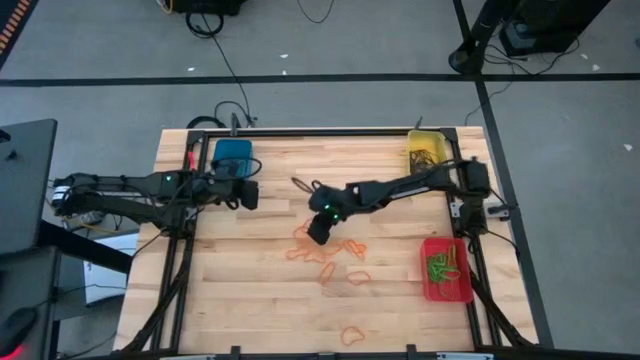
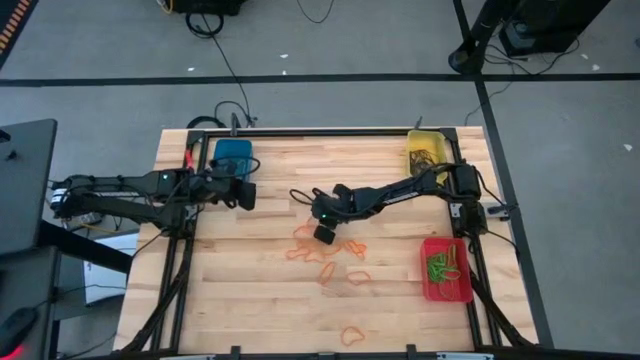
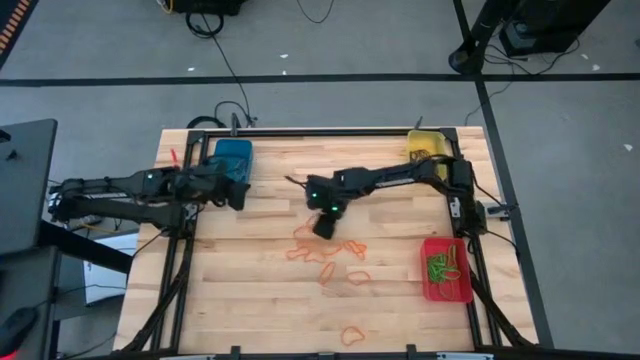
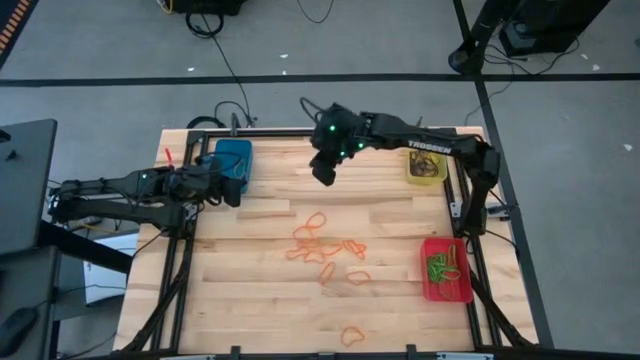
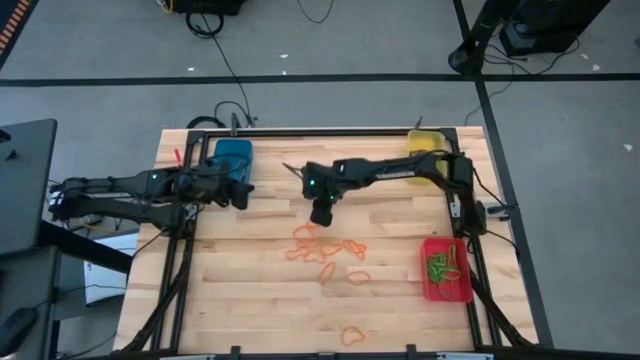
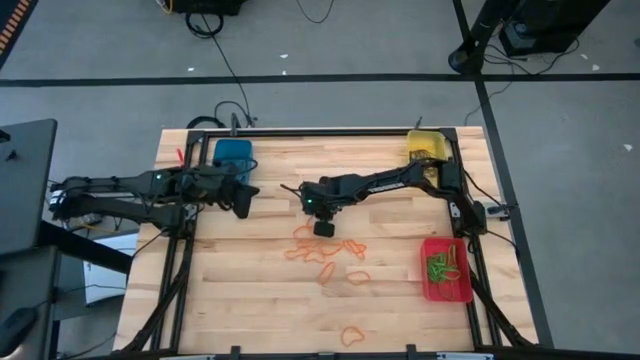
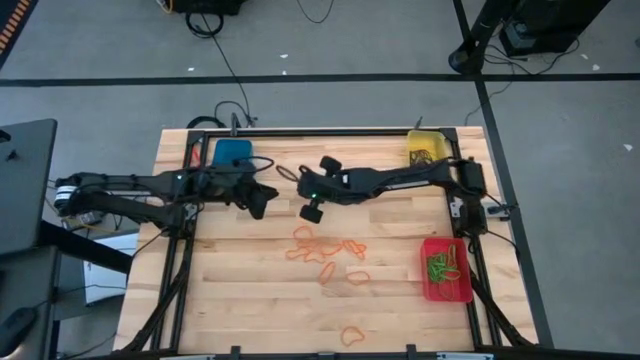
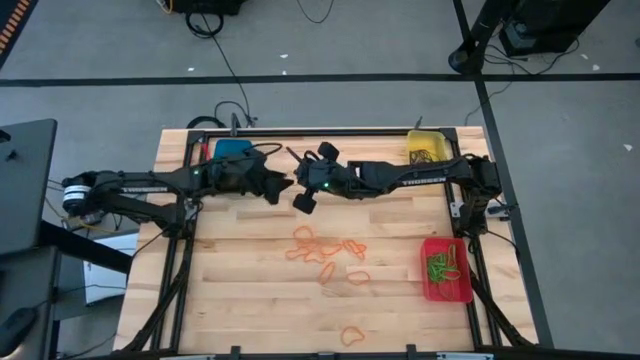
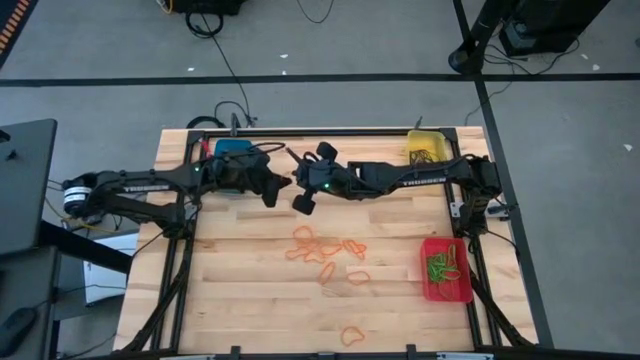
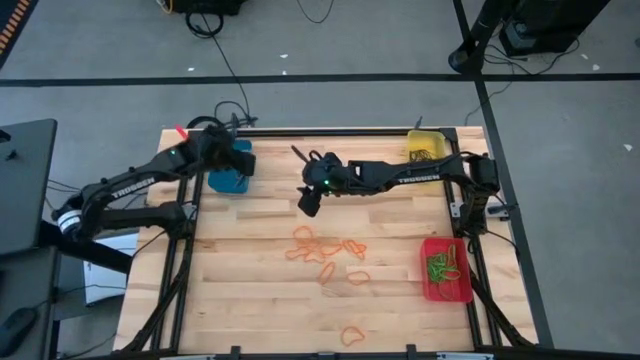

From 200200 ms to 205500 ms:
Task: Sort rubber bands into baskets
Put the orange rubber band into the blue bin

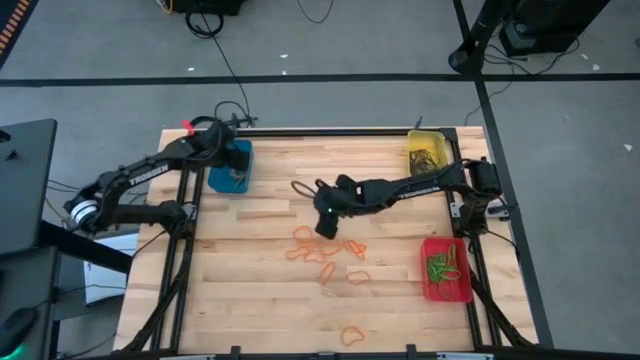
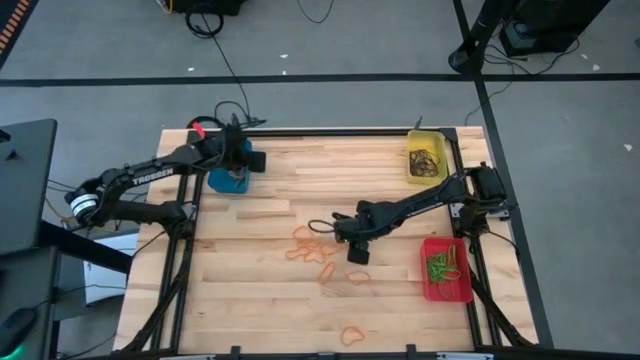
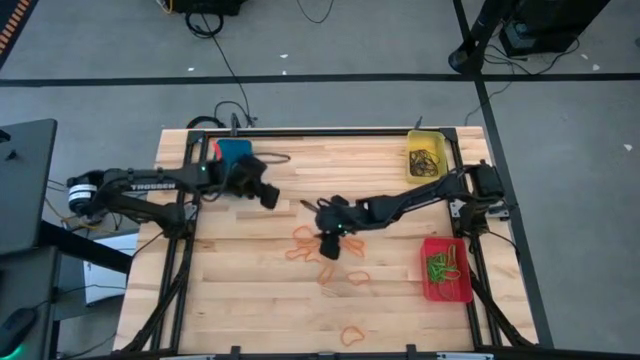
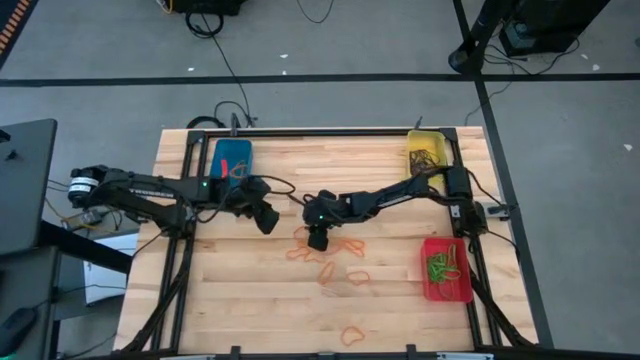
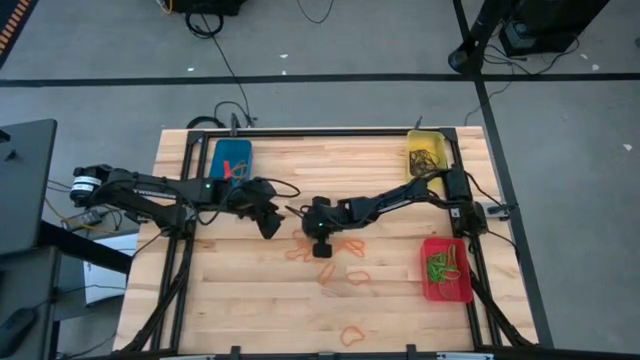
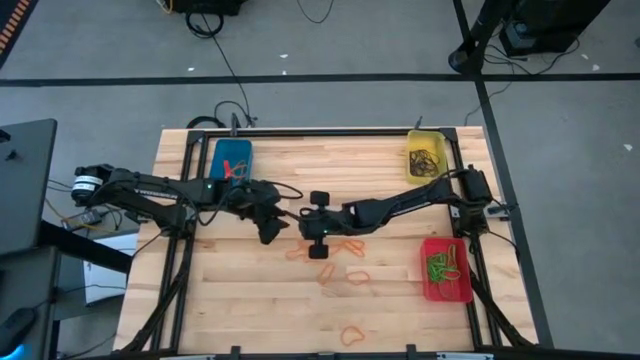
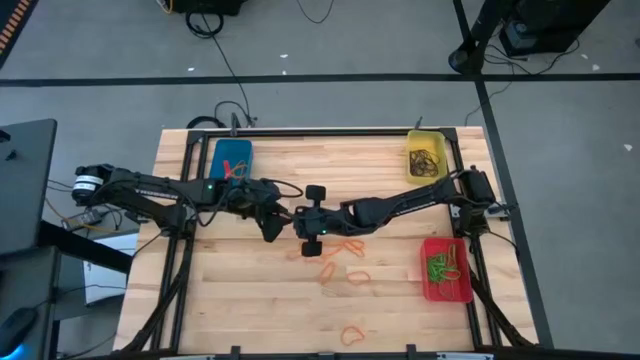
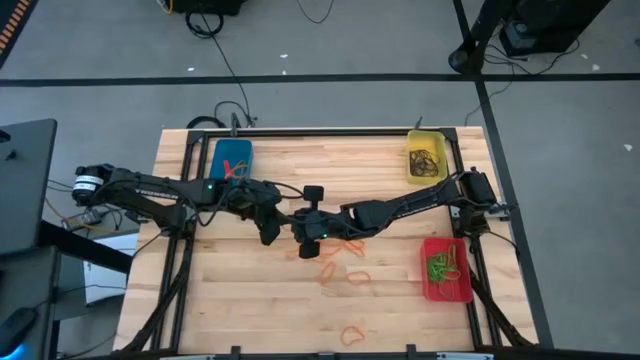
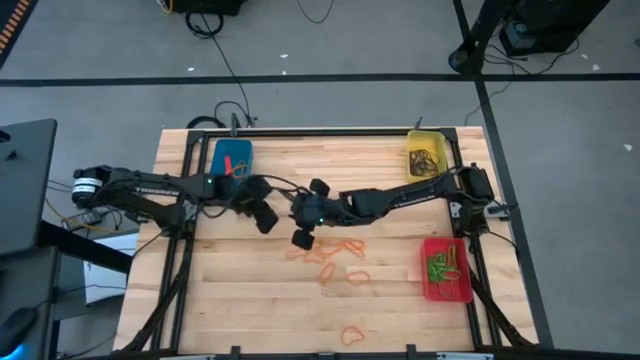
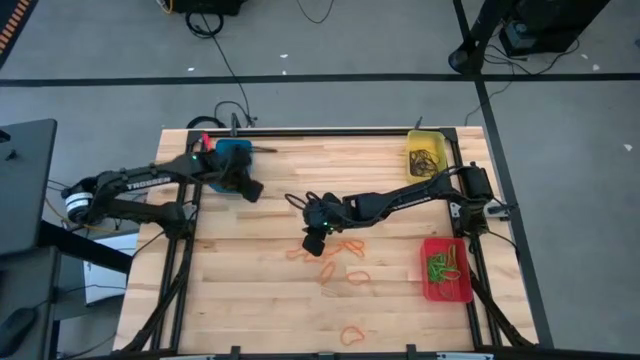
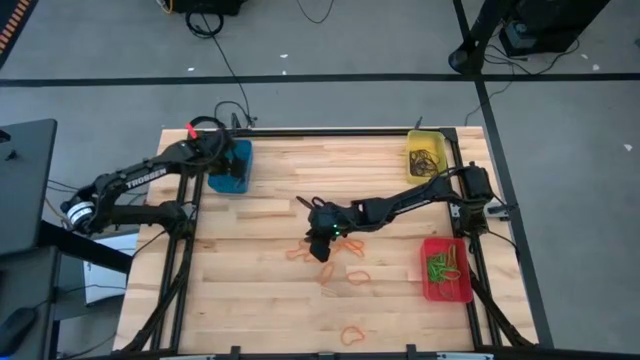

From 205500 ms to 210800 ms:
Put the orange rubber band into the blue bin

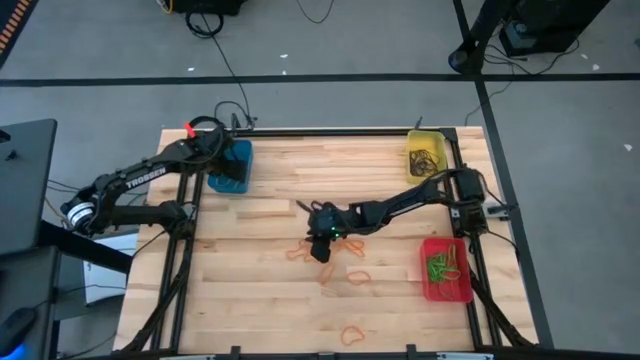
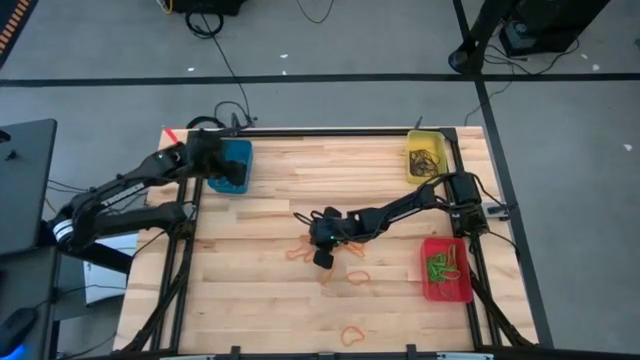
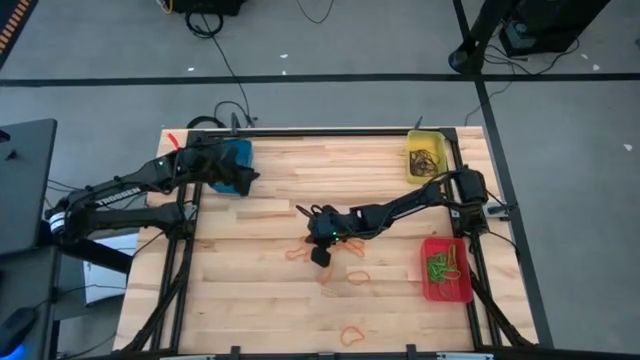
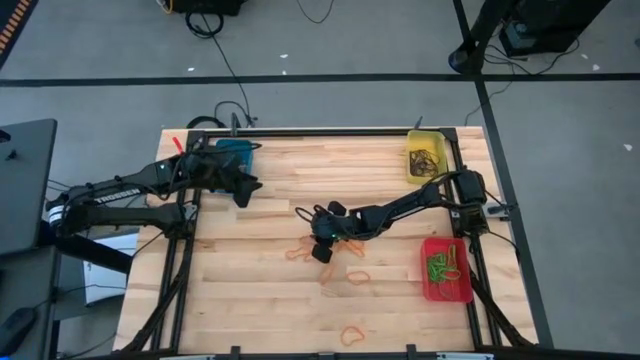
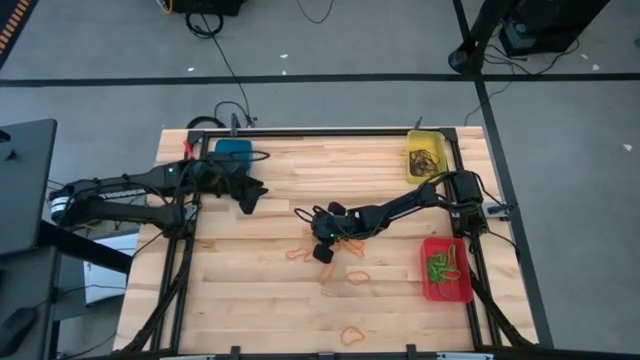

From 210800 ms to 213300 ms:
Put the orange rubber band into the blue bin

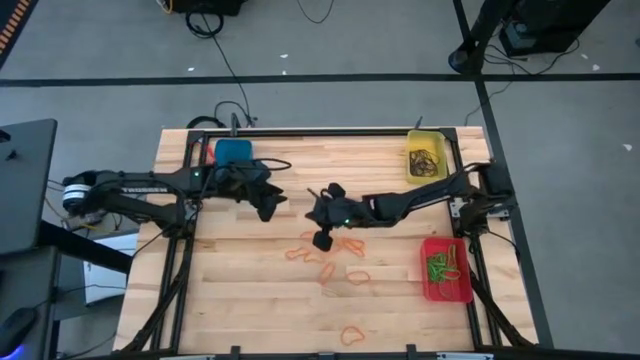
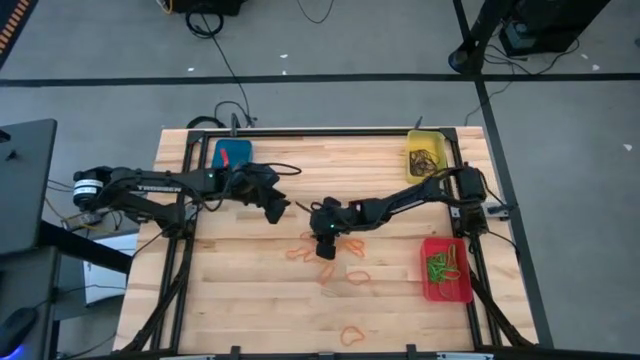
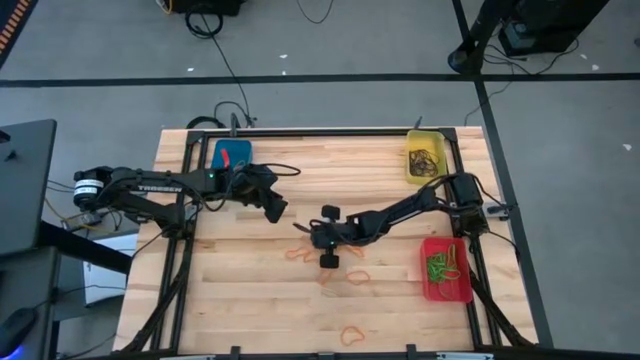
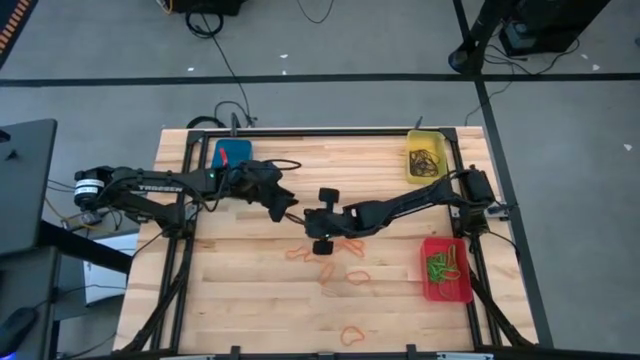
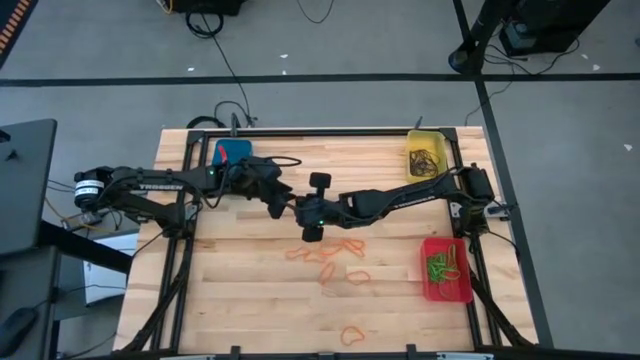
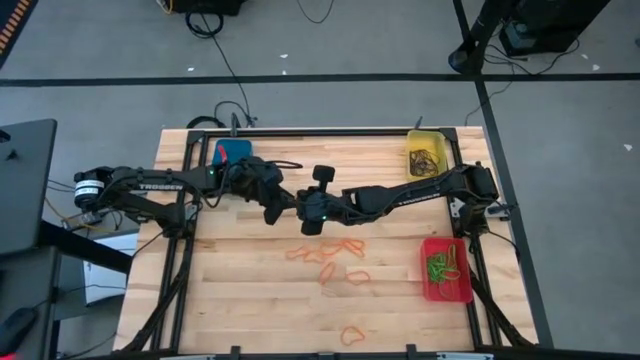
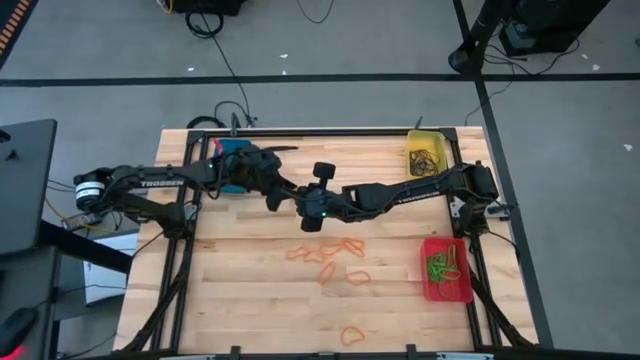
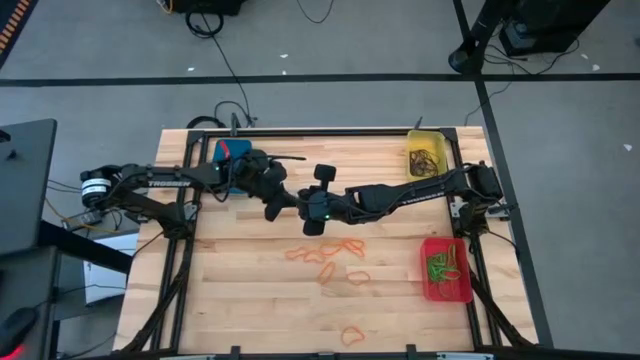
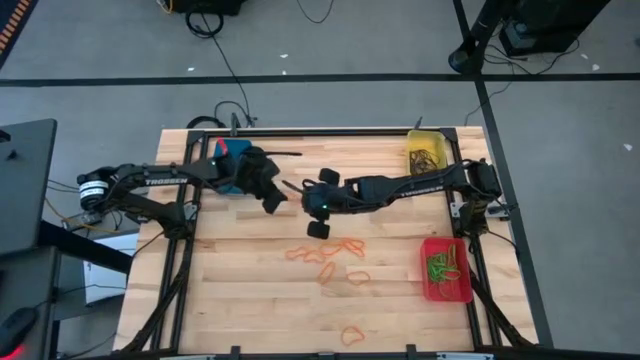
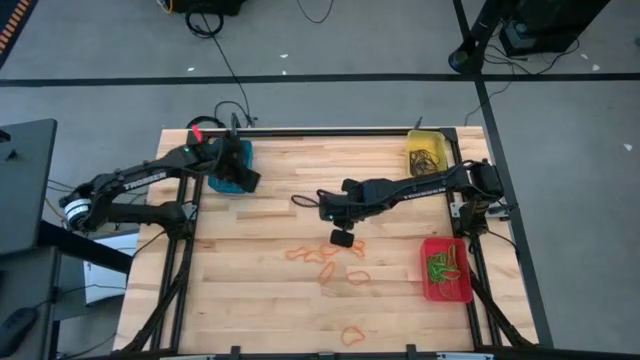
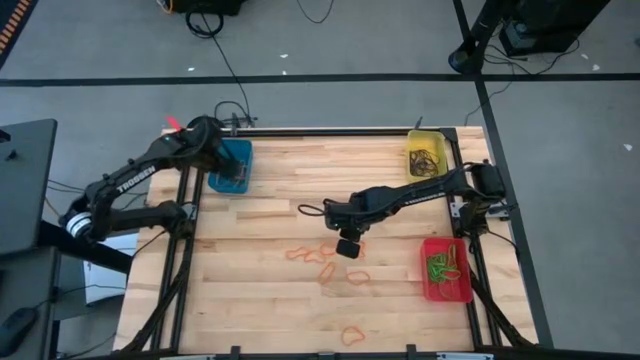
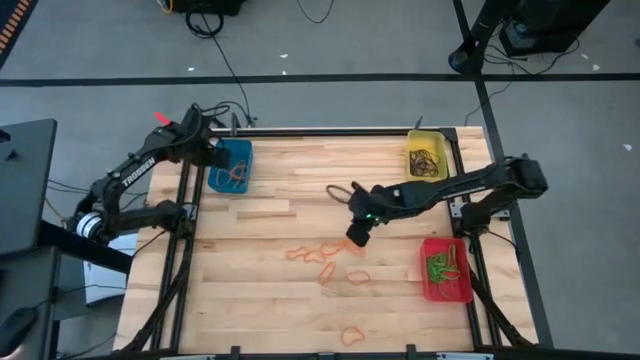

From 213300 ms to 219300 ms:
Put the orange rubber band into the blue bin

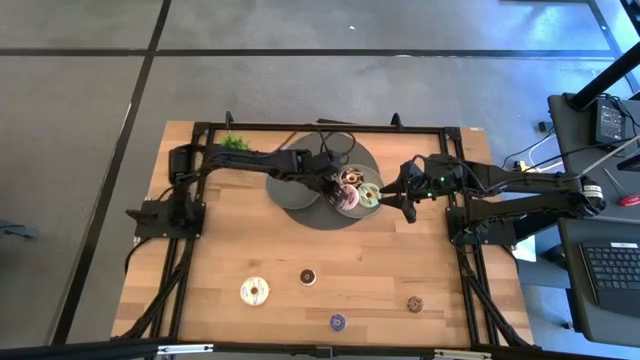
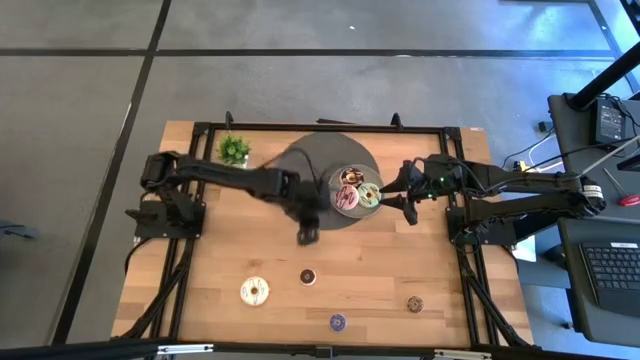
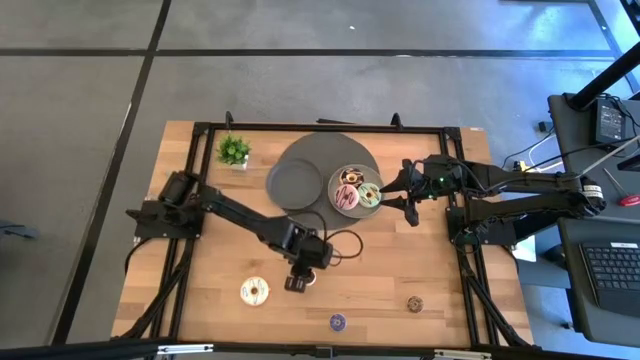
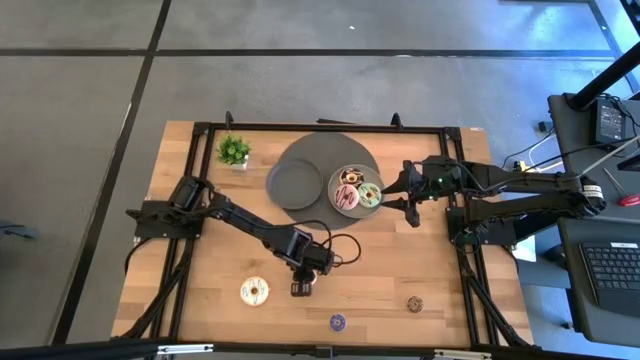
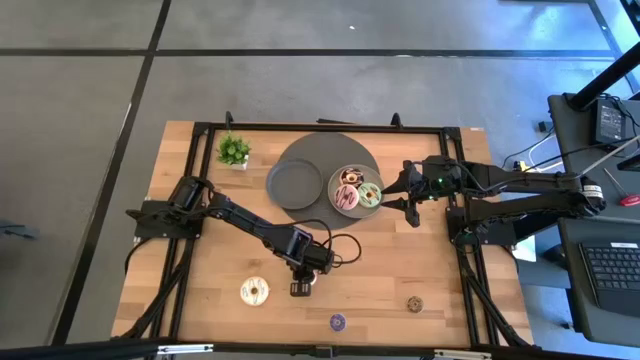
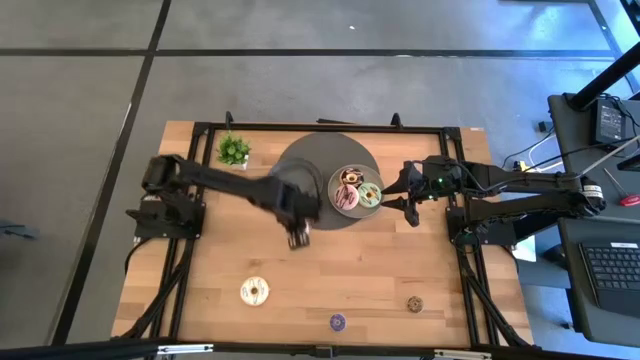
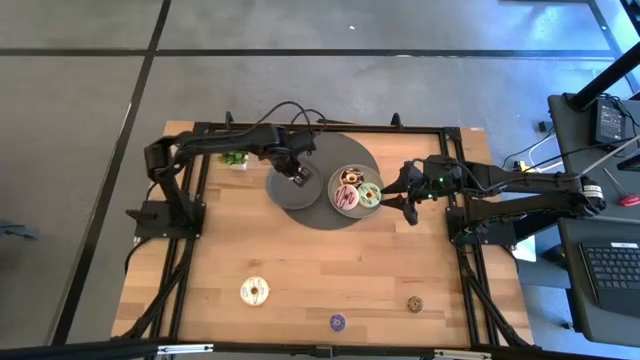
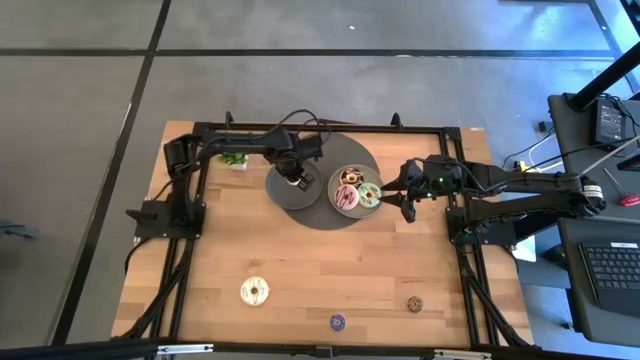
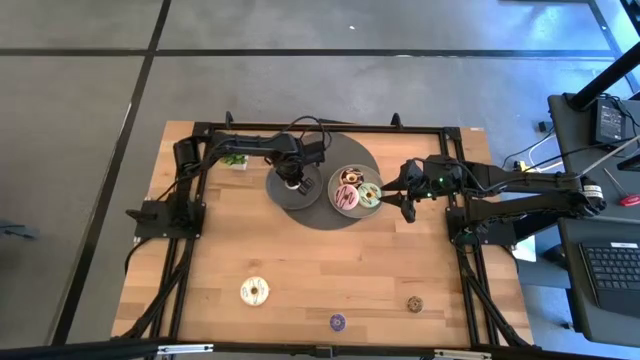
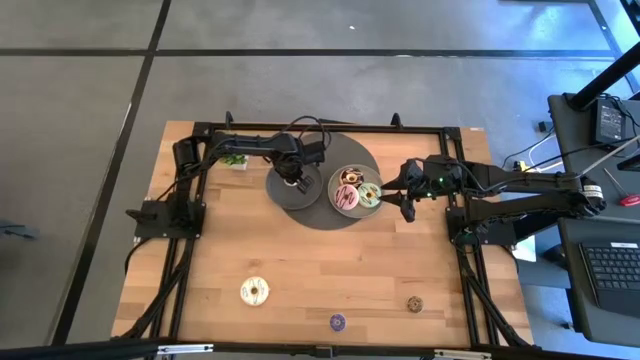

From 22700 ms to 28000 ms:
Task: Pick & Place donuts
Put the top small brown donut on the dark gray plate
